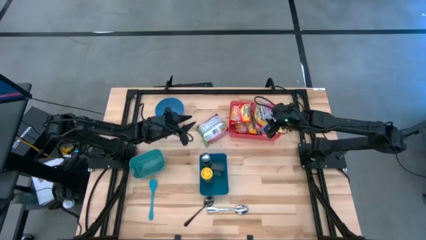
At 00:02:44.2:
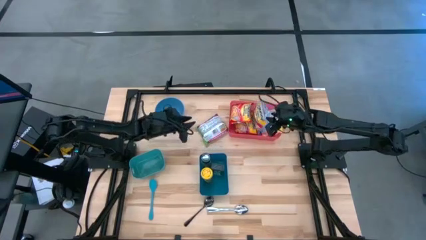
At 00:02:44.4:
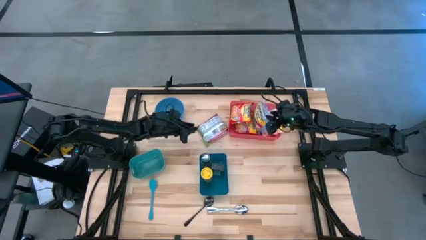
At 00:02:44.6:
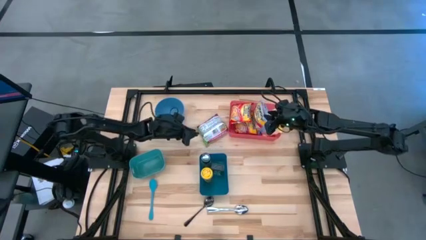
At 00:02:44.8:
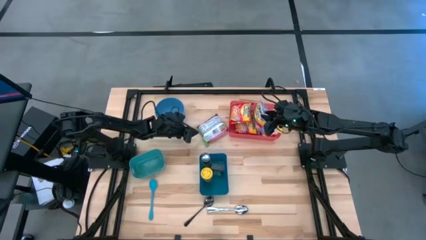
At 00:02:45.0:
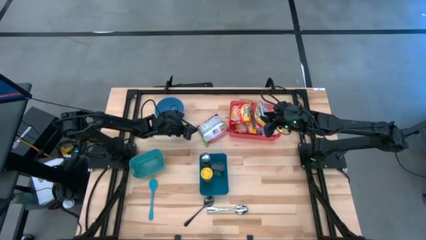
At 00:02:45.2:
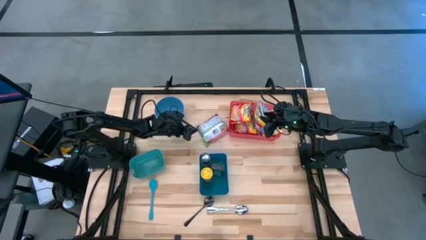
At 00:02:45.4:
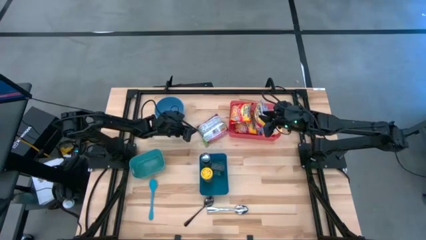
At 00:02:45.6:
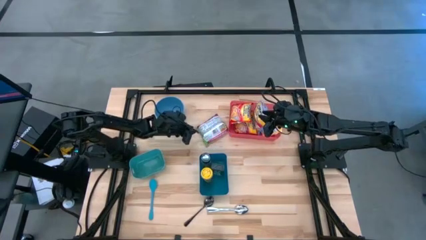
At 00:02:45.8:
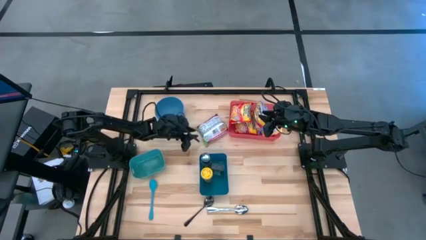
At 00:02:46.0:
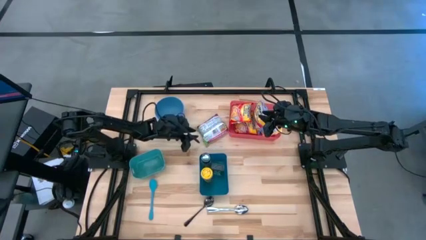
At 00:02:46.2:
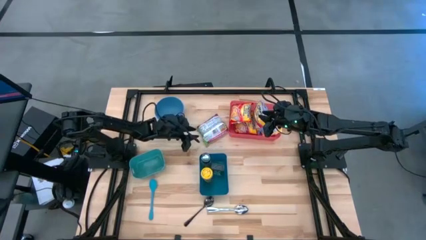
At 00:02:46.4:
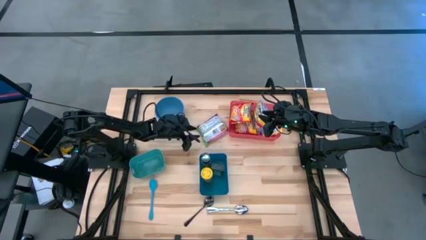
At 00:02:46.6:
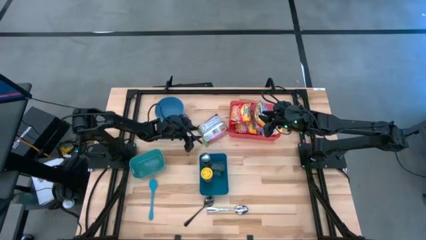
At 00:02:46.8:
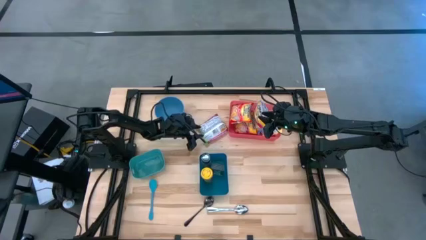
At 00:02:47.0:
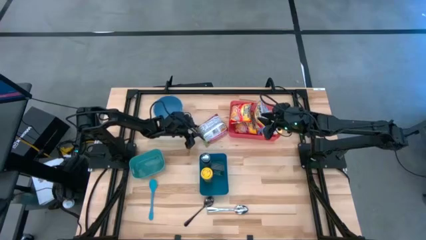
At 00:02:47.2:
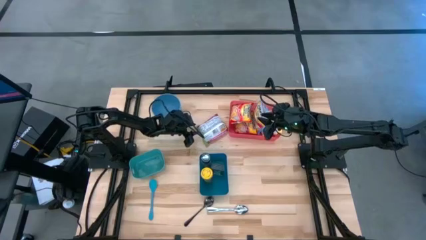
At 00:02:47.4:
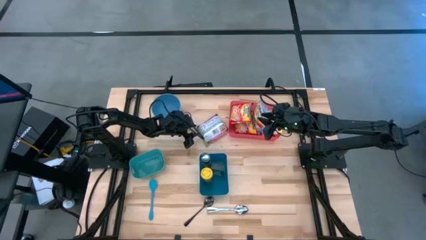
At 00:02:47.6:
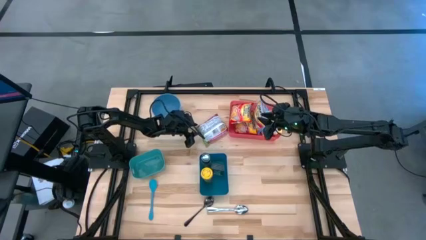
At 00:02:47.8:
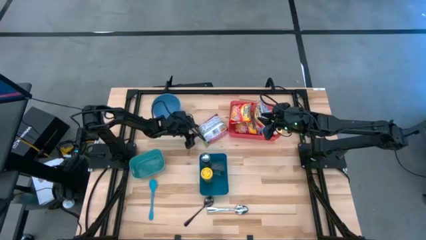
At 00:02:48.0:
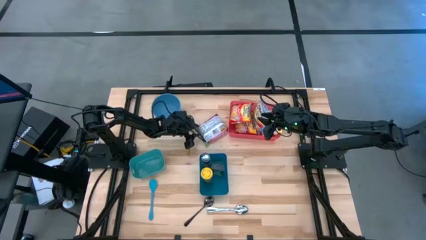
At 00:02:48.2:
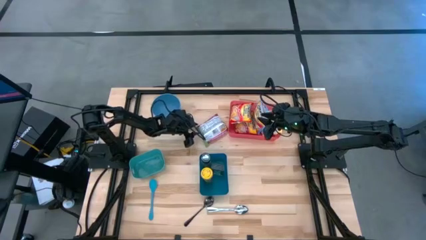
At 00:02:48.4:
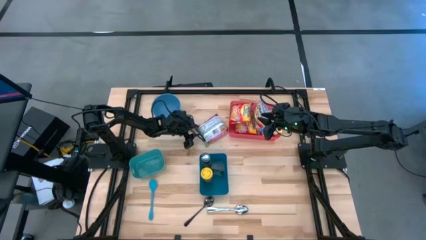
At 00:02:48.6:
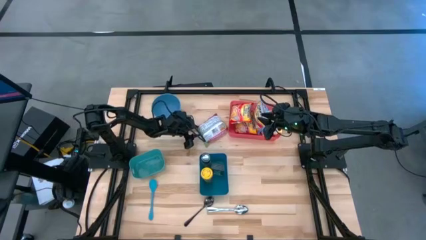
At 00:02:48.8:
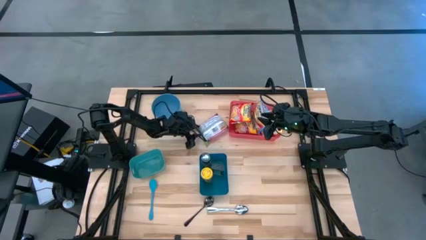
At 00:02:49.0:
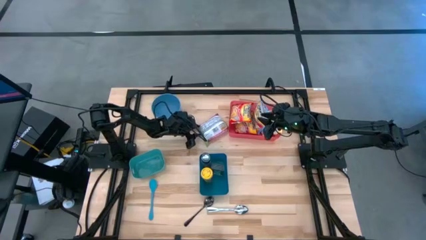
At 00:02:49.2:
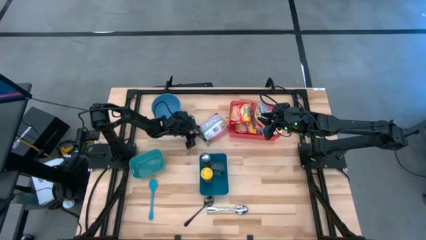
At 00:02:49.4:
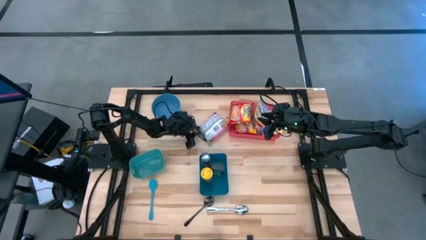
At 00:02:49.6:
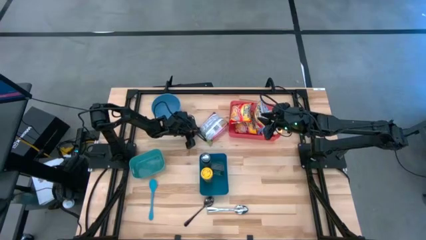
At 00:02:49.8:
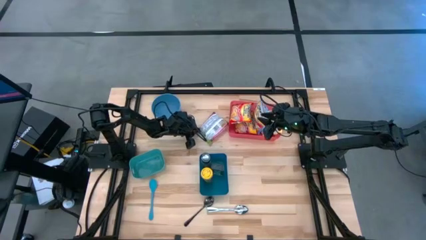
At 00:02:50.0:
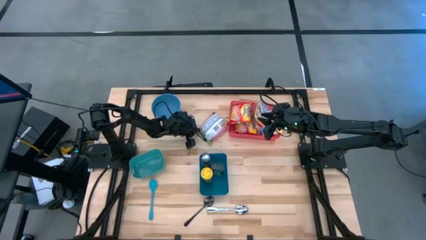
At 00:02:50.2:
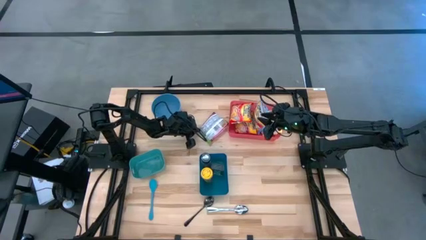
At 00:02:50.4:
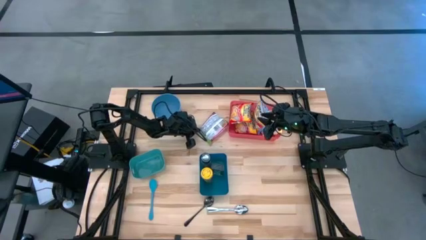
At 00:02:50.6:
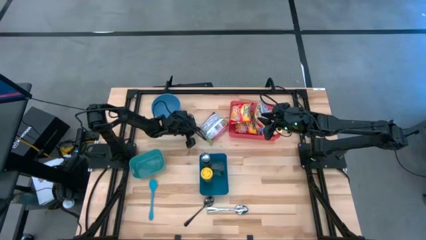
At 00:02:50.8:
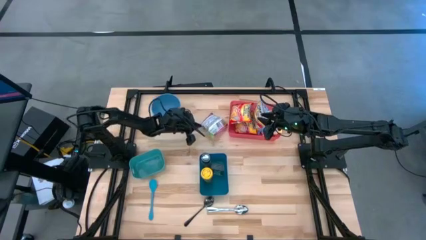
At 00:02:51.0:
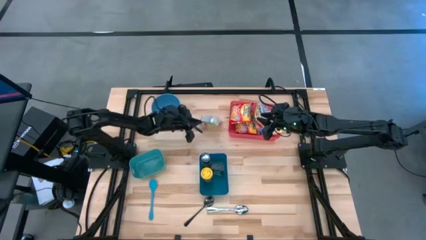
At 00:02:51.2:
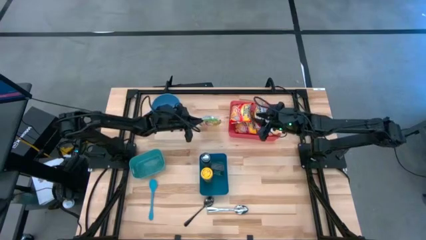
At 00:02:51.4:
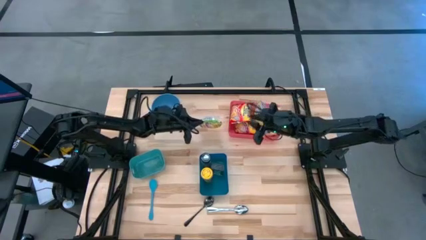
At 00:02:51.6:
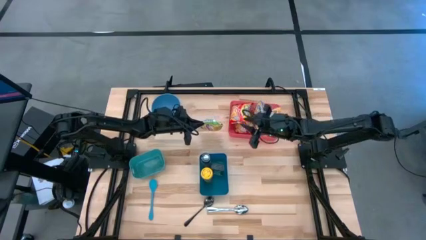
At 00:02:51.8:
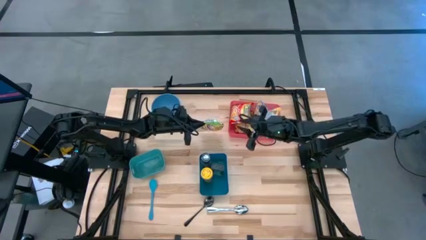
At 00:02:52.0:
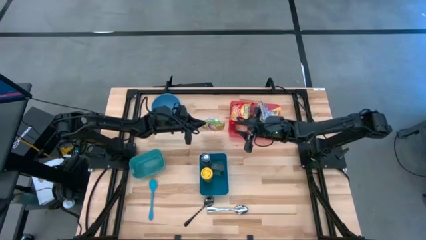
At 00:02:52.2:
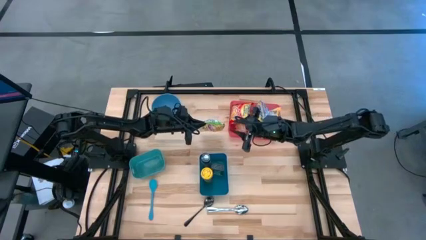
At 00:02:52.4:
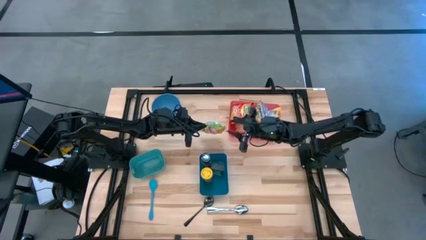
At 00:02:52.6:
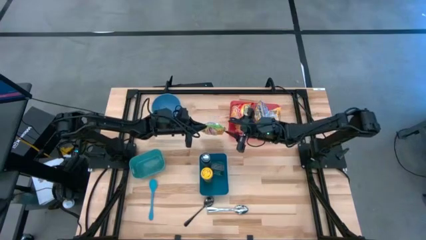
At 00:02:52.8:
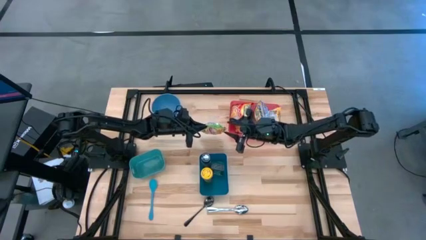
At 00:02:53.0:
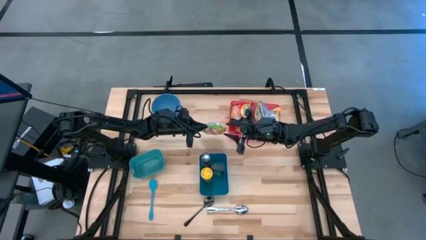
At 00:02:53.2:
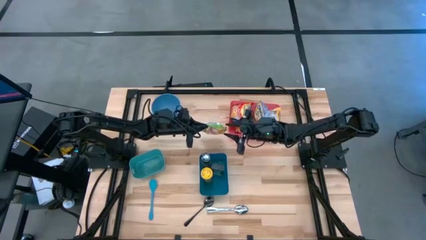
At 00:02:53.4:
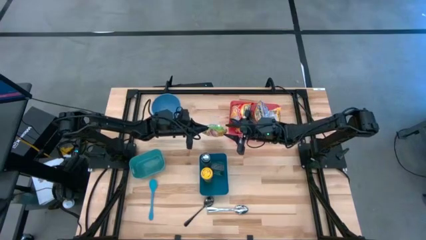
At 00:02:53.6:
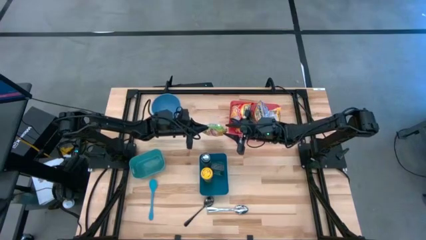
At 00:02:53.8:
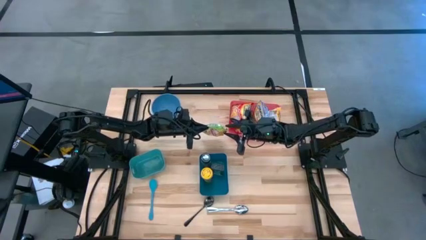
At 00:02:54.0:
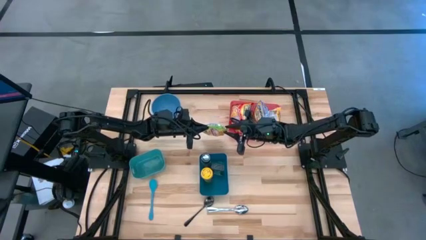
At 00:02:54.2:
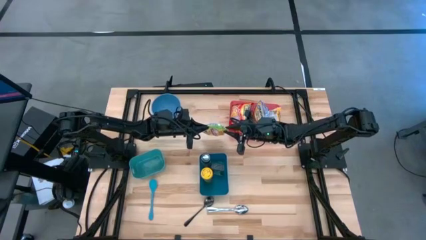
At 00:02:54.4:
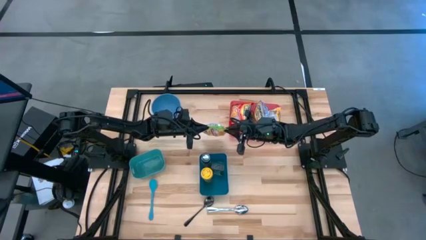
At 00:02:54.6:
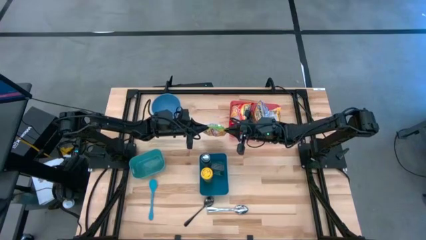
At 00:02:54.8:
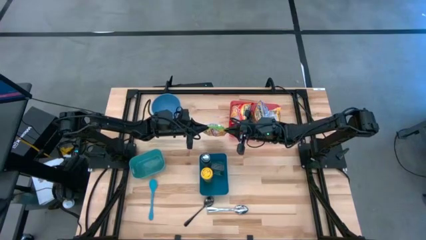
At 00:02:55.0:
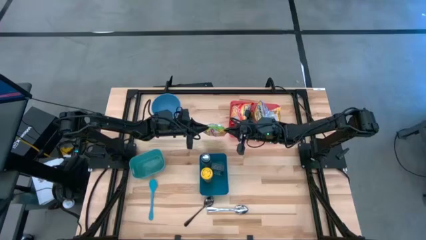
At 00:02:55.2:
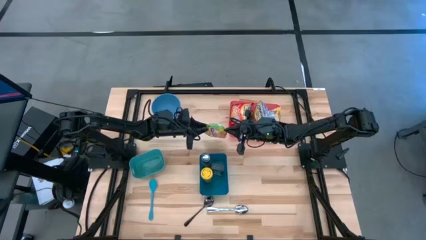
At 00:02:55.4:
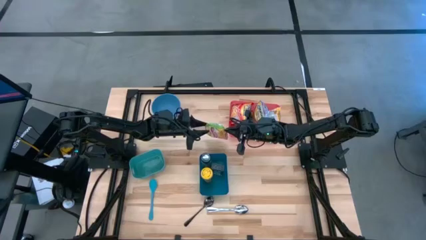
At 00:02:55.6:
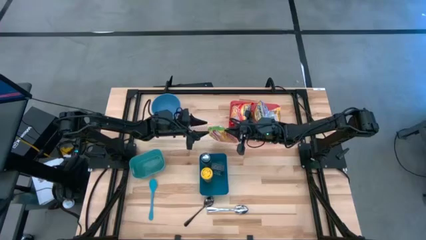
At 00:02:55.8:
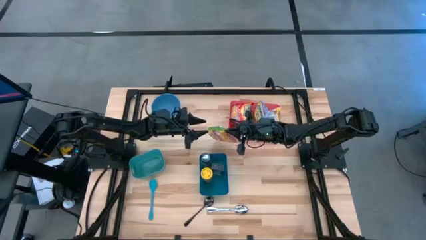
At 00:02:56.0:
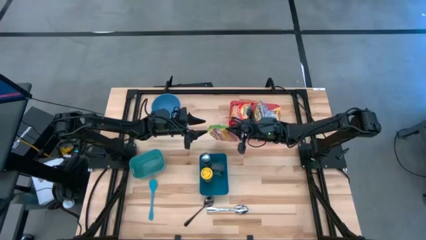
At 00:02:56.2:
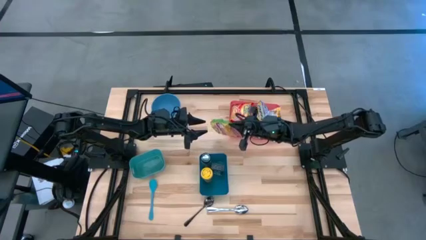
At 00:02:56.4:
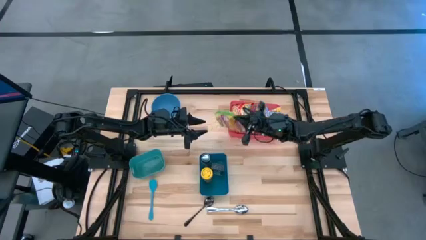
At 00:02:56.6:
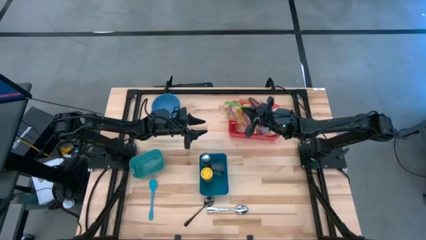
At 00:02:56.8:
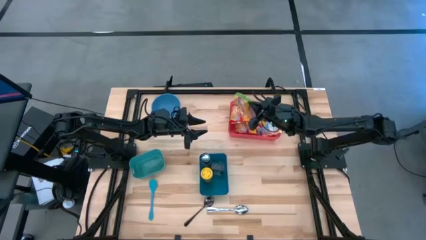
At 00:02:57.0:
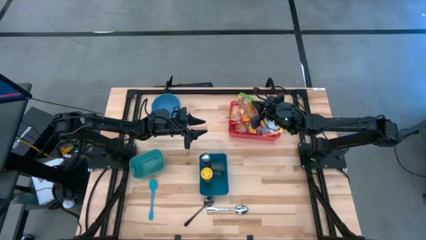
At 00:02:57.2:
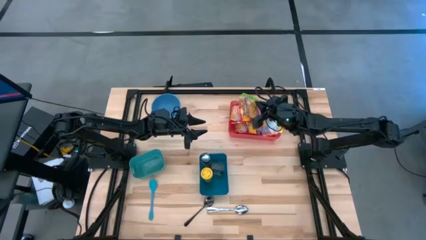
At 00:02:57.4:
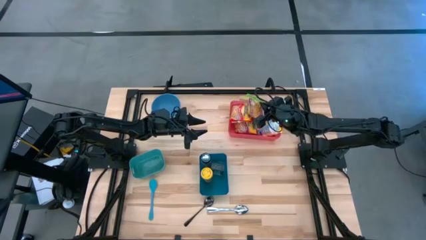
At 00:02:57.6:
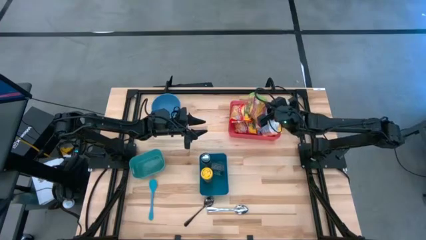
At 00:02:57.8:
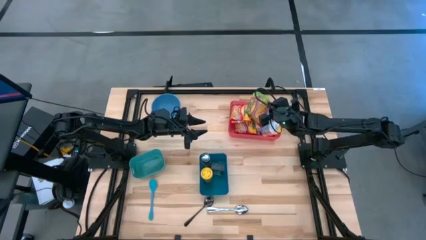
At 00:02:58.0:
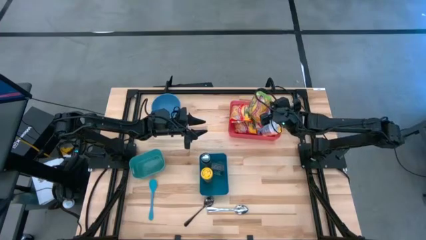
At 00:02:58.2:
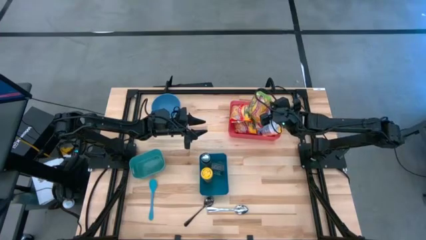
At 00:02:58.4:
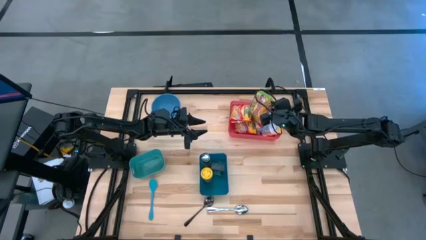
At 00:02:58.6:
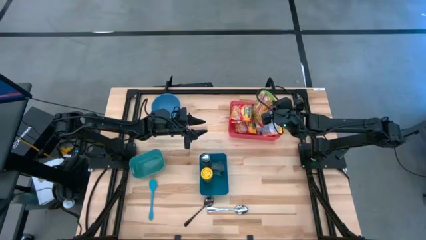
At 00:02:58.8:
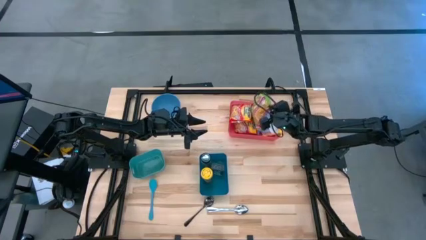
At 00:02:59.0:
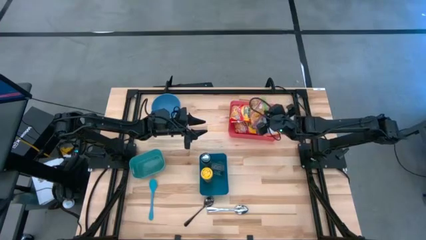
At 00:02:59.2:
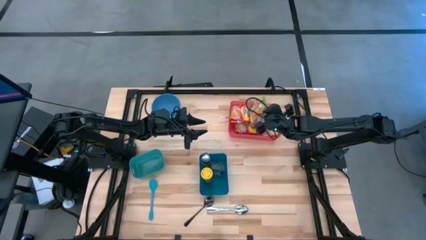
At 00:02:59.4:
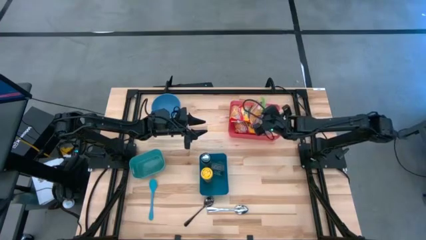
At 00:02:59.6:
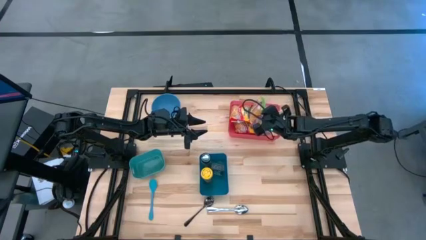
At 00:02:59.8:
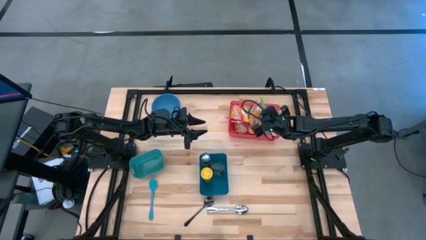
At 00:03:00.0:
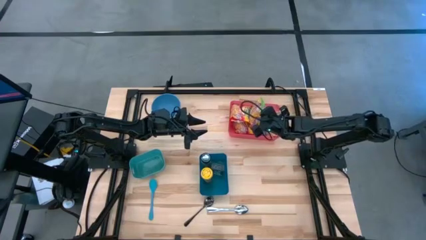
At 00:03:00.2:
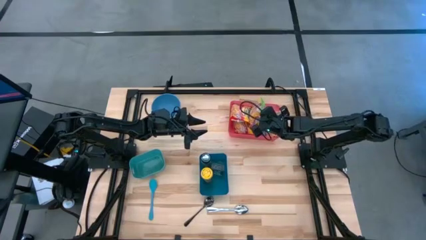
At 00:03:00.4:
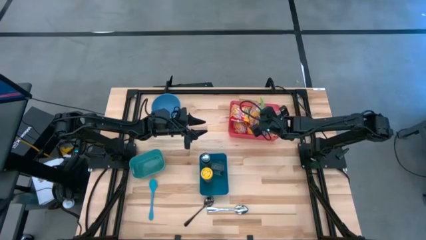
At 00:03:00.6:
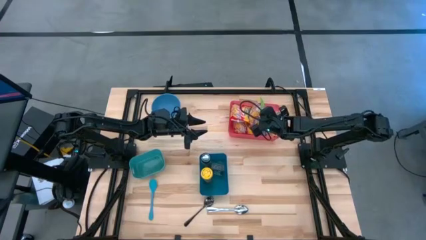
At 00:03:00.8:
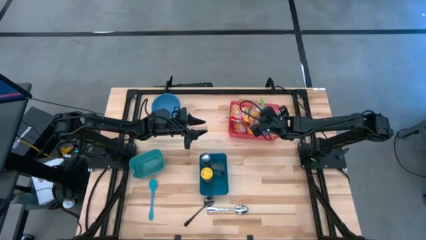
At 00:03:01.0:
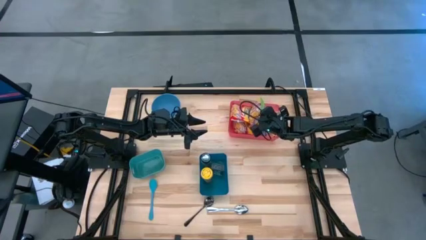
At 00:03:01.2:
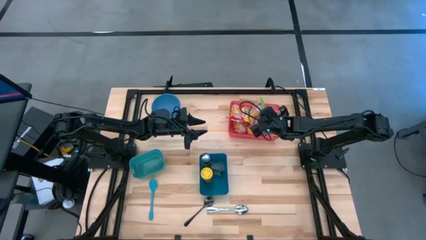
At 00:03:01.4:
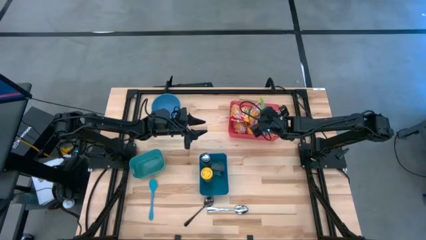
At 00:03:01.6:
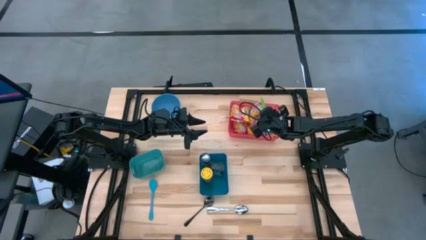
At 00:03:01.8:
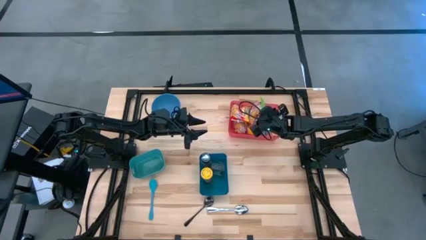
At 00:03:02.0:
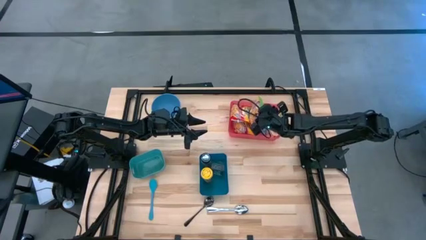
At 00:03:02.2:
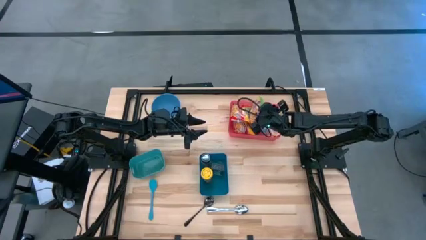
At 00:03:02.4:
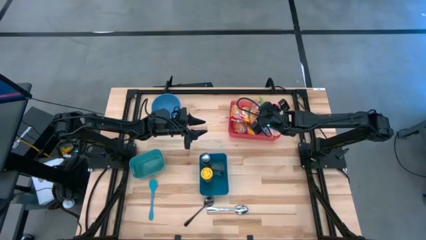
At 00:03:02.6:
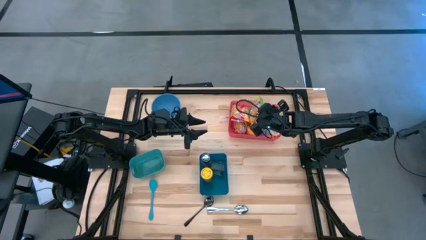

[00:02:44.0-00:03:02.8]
Task: Pick & Place Food Item
Put the green noodle pack into the red bin
